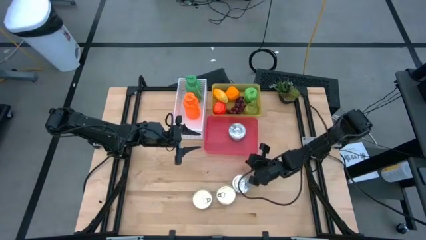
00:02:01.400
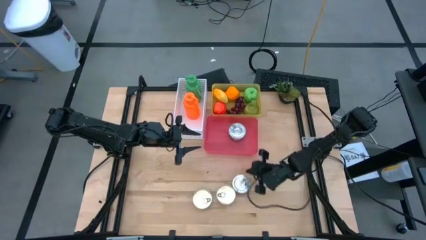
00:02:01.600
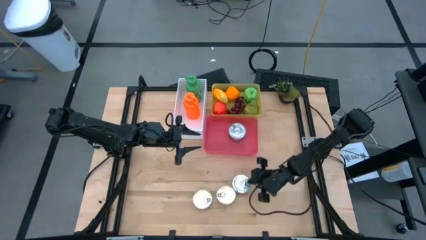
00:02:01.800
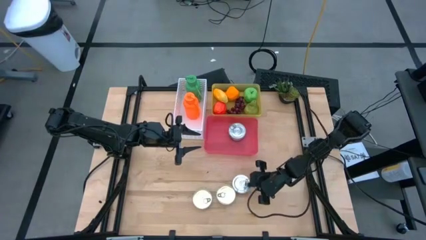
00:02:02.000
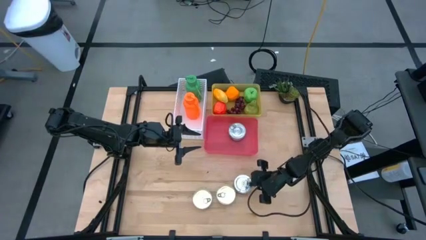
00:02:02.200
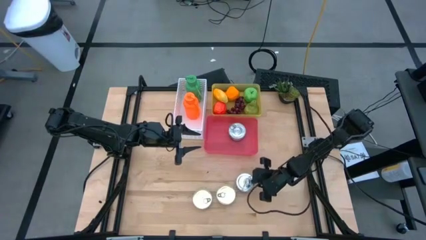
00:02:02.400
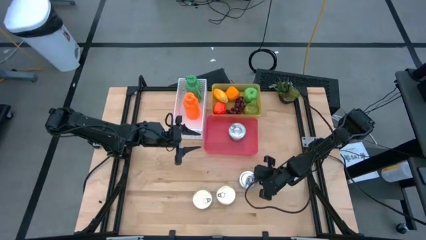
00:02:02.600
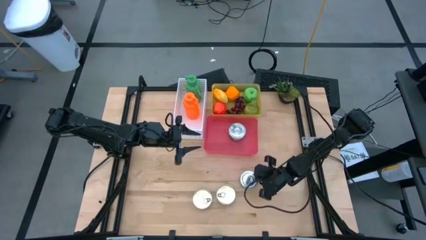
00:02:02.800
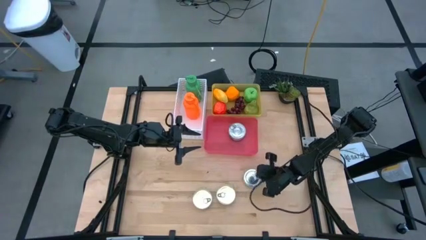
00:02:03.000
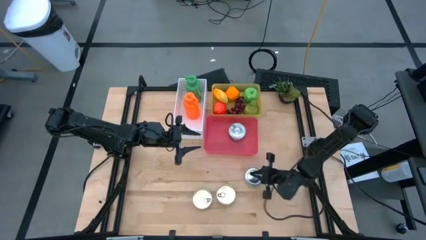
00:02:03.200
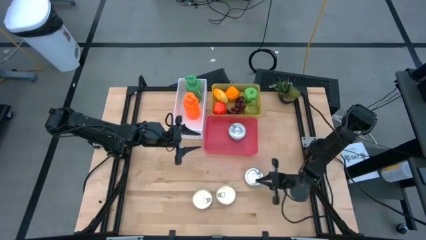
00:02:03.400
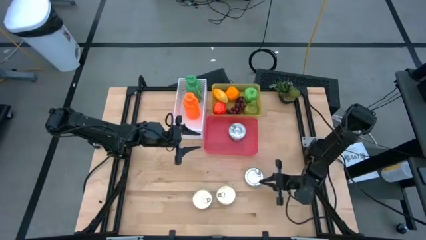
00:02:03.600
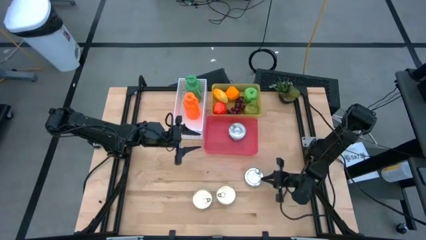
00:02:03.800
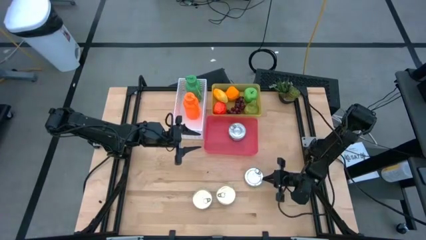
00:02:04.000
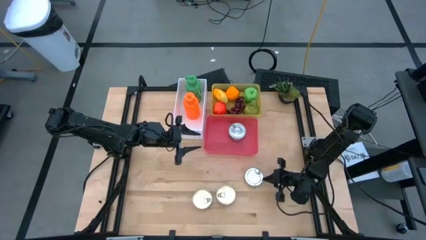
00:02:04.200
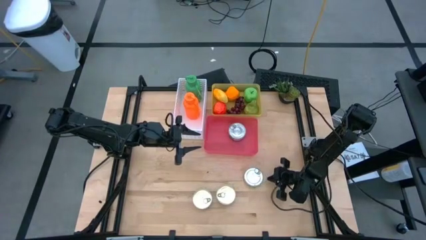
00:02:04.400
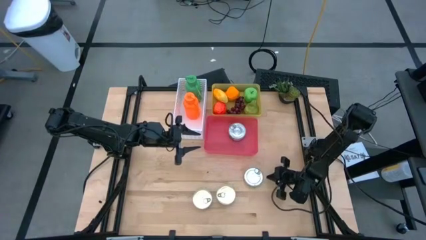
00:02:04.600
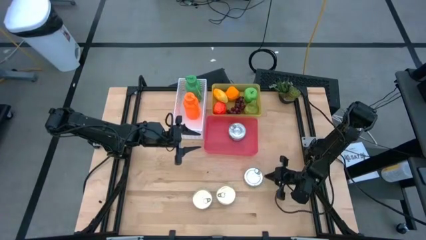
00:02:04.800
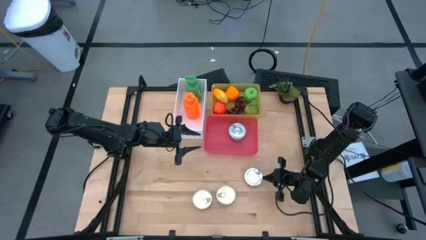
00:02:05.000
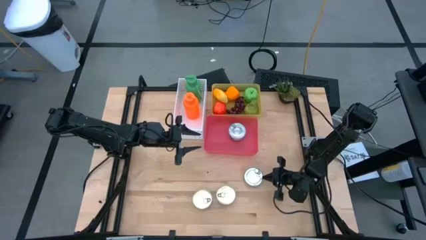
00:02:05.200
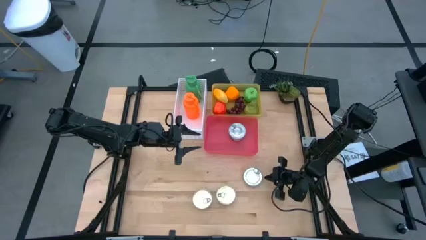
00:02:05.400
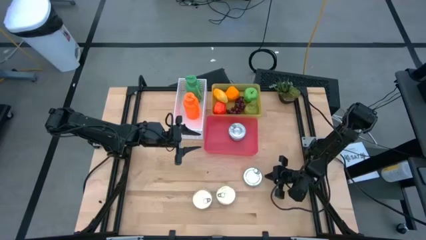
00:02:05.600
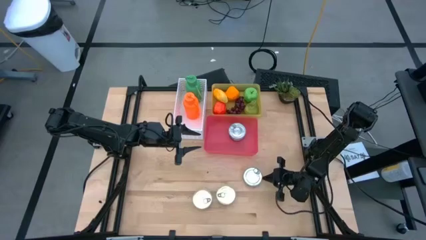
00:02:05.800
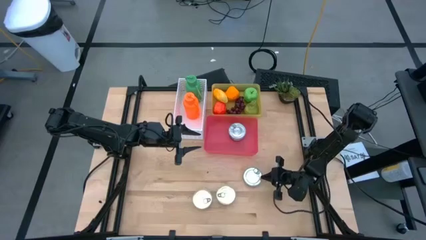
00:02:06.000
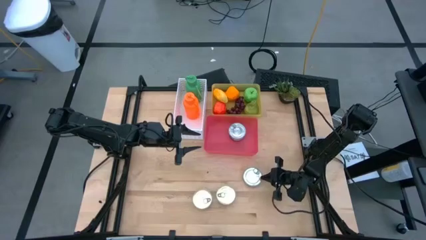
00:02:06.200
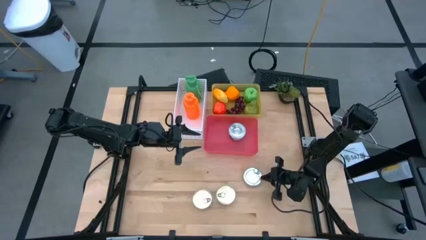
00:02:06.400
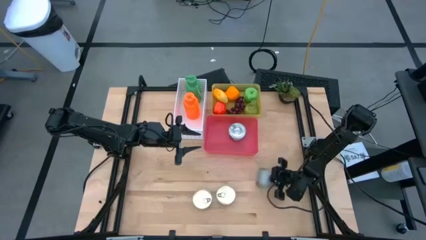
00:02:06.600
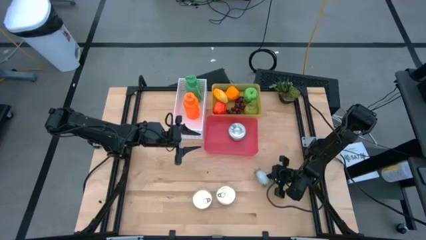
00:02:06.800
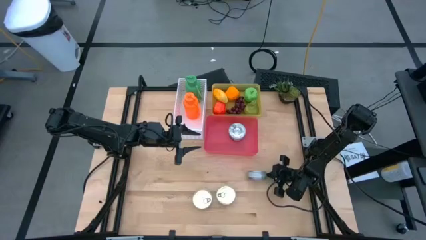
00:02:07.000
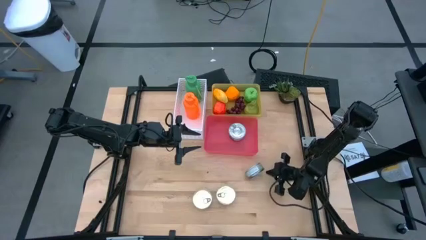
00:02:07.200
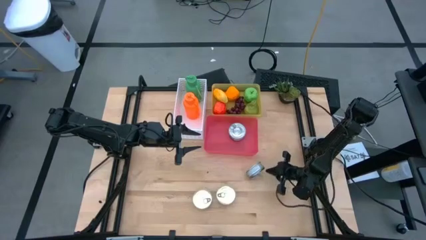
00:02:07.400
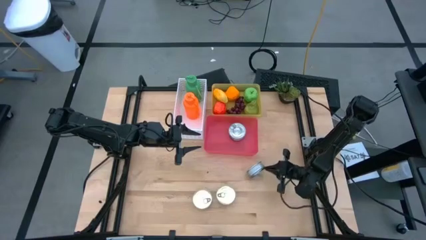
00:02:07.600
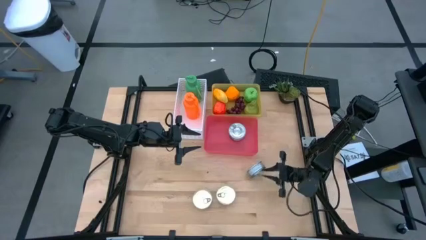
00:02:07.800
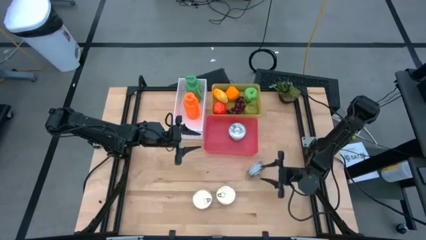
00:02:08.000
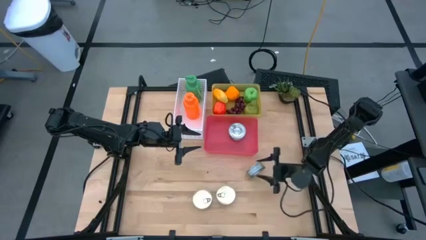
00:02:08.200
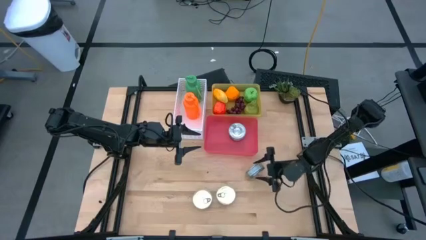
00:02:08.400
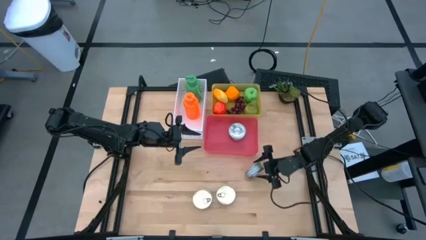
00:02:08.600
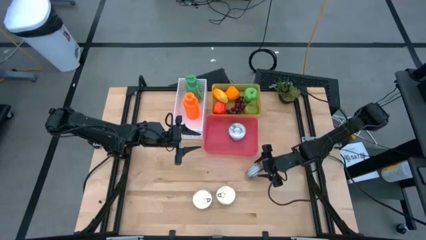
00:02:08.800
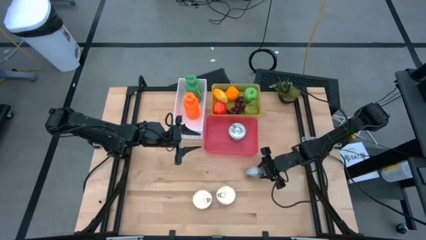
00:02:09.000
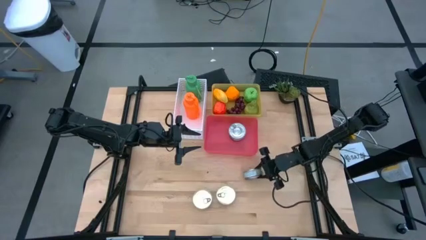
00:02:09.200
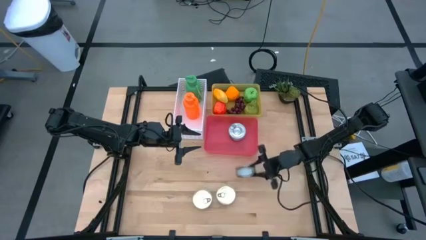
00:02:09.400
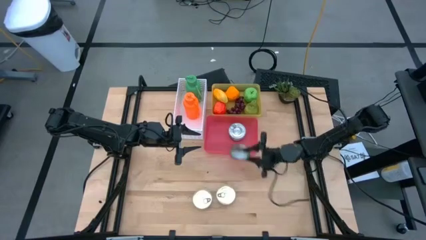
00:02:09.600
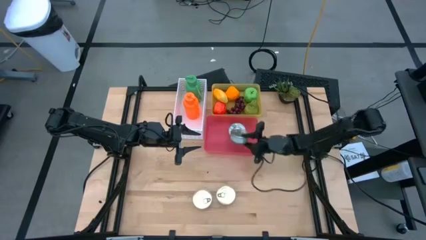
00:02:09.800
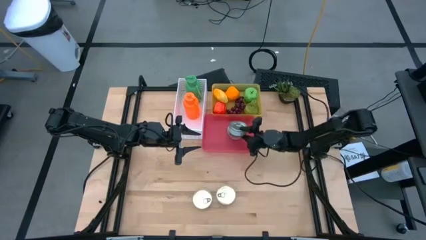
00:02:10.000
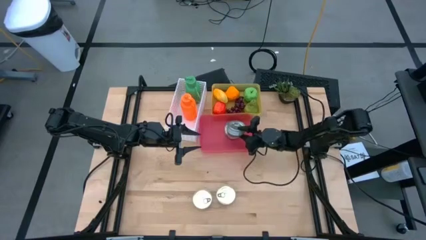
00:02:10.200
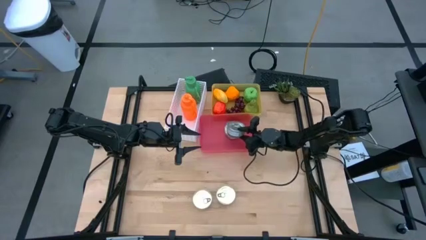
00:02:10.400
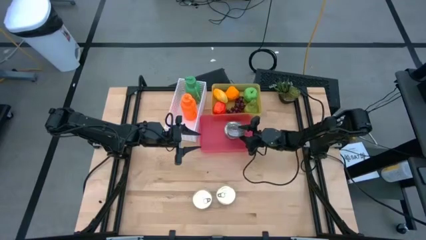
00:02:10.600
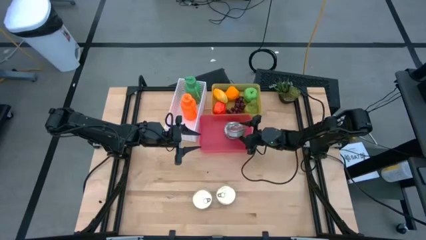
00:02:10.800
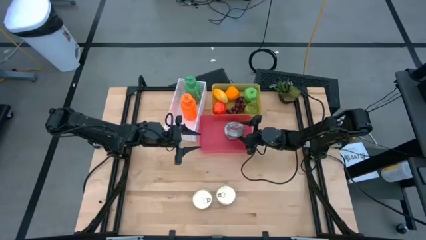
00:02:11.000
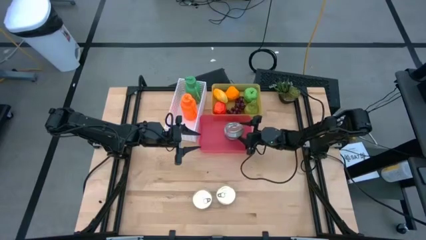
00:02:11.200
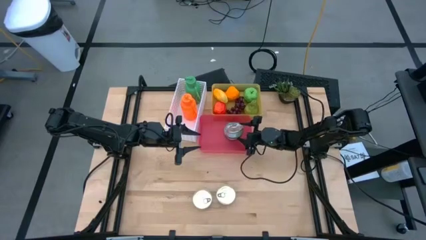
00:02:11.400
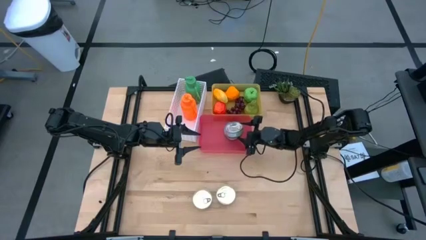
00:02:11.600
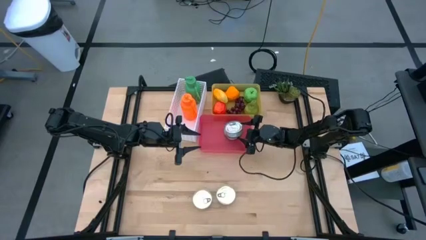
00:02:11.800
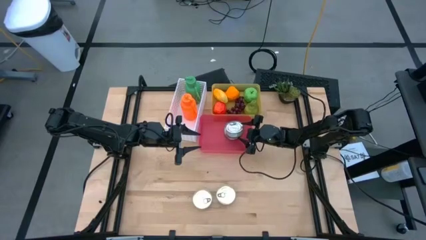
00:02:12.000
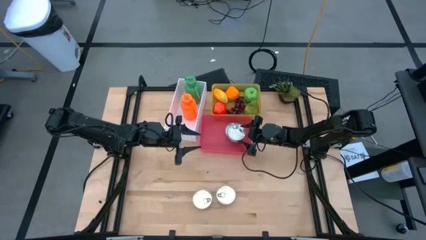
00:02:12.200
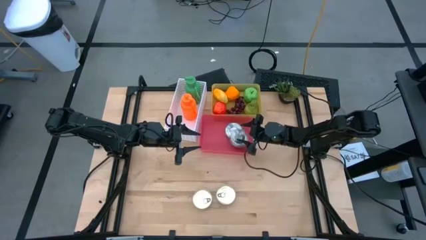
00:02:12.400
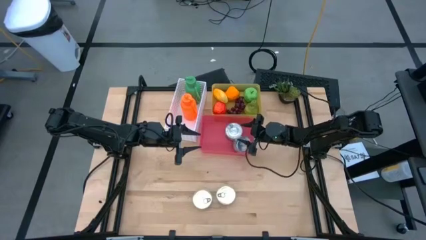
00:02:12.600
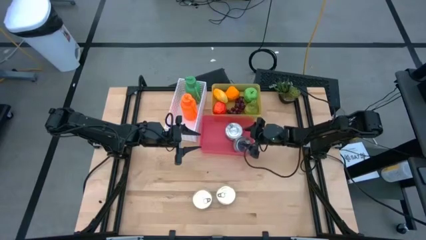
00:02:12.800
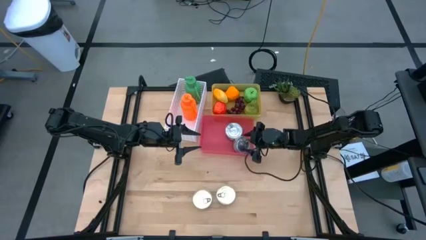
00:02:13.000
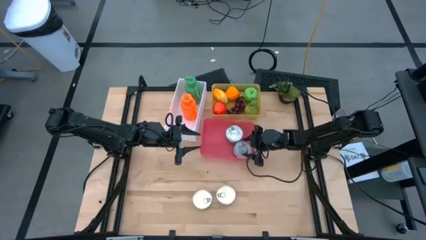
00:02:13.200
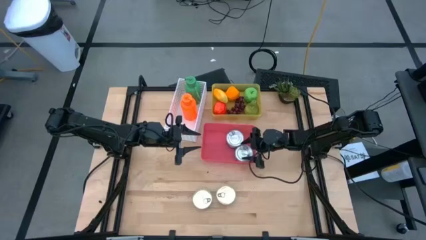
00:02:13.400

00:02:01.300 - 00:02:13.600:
Task: Pick & Place Food Item
Put the green tuna can into the red bin

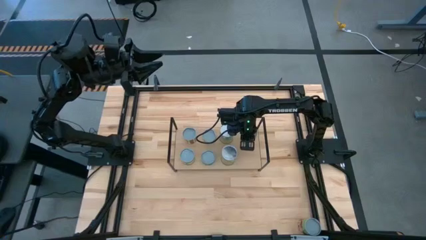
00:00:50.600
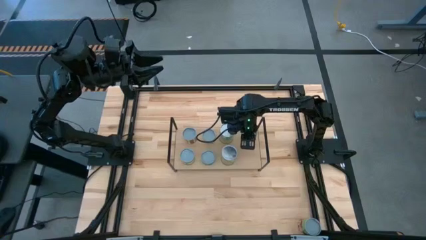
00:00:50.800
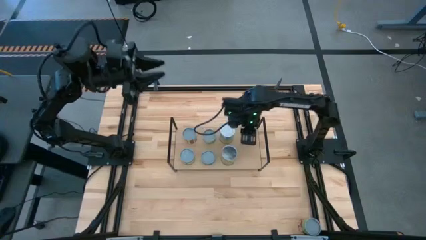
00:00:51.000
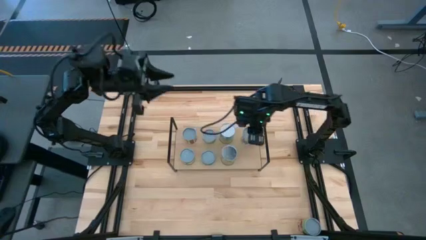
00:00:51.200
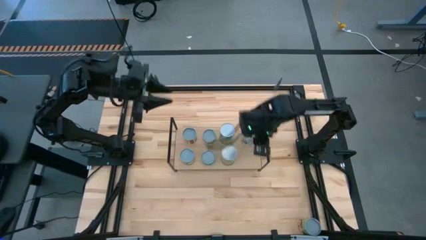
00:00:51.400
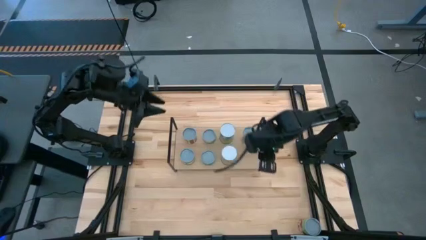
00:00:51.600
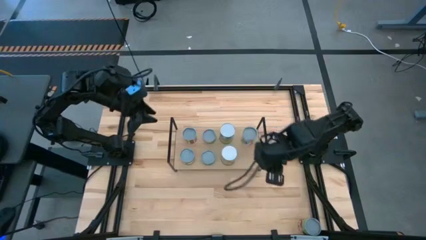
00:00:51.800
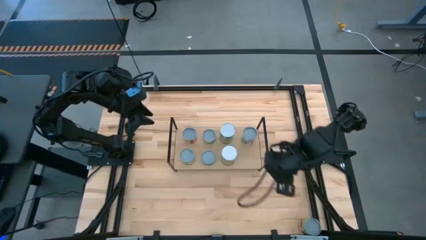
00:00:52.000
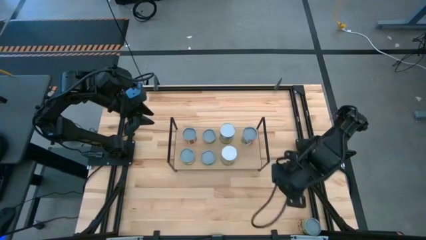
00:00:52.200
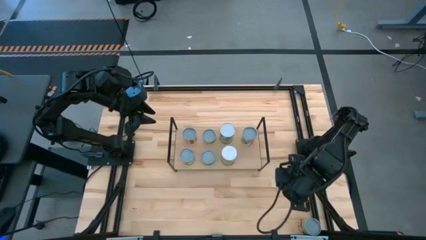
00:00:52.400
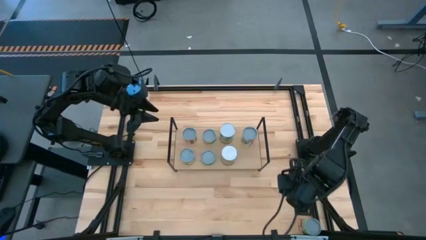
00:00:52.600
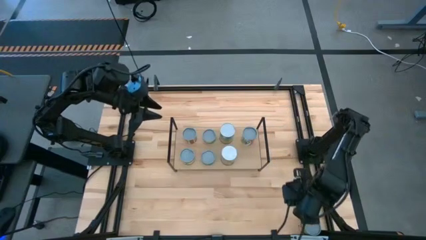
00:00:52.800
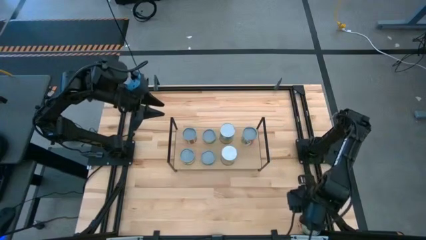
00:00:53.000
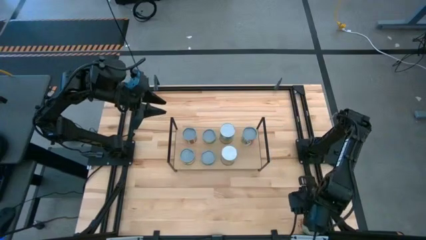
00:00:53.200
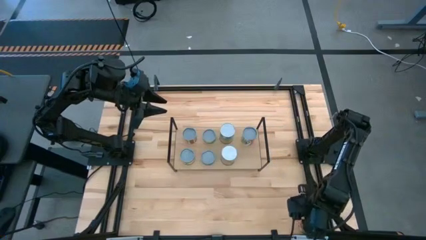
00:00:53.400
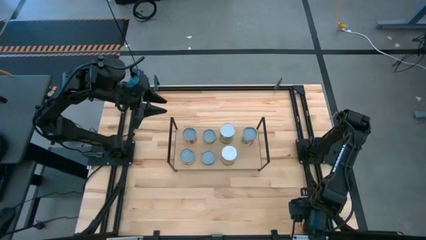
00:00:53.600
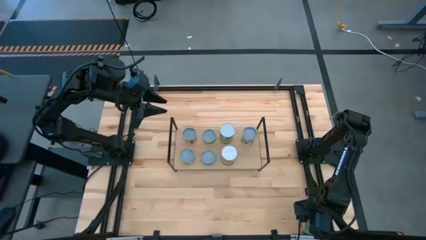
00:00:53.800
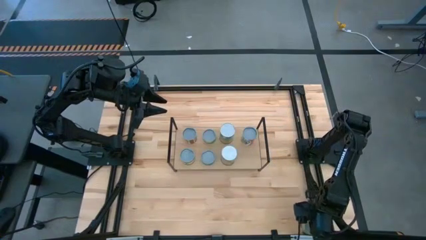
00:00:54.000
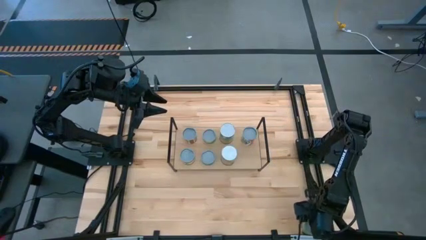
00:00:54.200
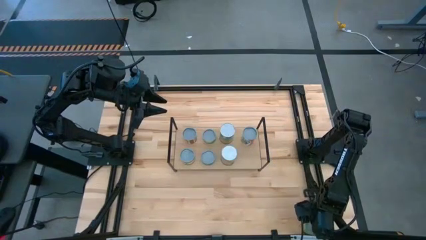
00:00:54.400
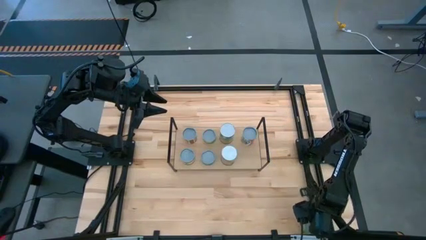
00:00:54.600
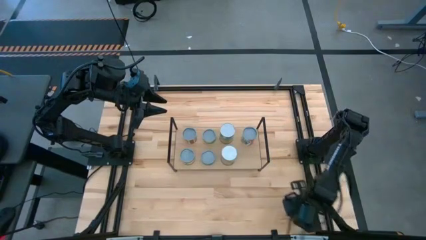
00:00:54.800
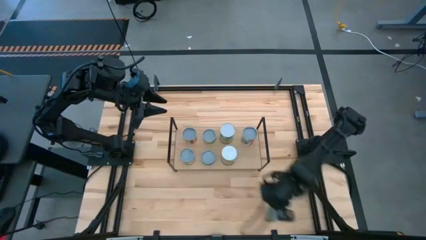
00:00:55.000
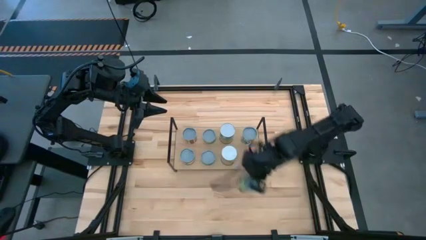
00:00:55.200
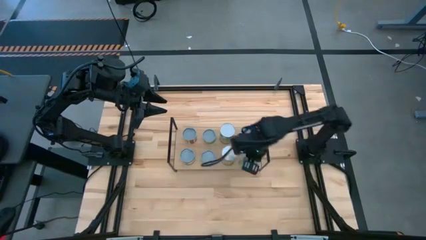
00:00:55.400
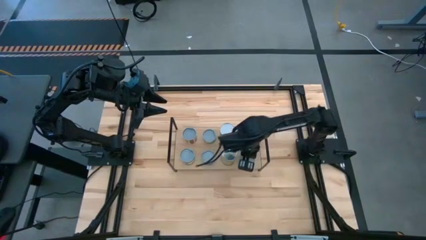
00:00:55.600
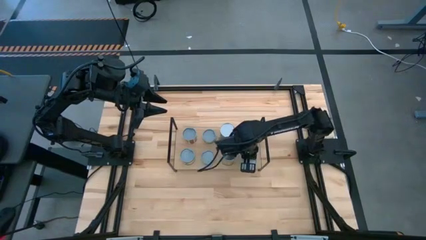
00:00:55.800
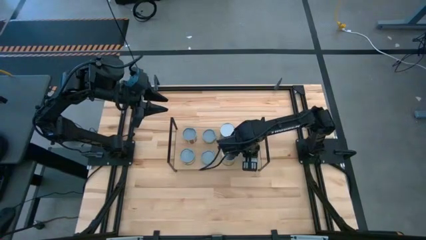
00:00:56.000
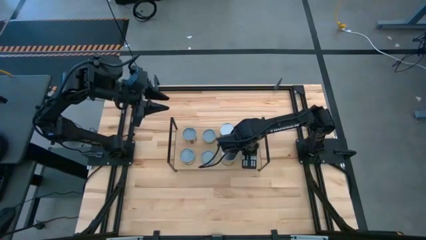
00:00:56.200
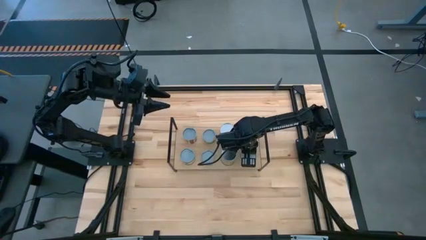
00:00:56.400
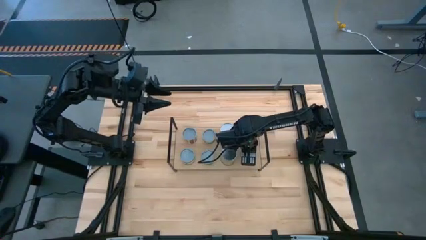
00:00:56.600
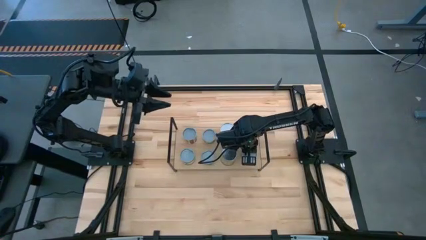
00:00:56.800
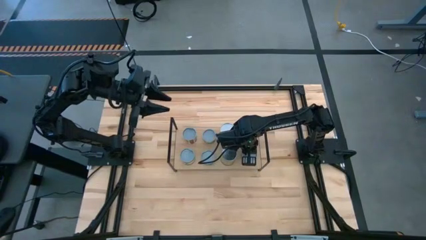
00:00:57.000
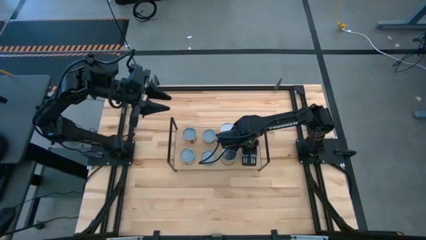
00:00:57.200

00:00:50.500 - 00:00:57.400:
Task: Pick and place cans onto a shelf
Put the canned green on the shelf
